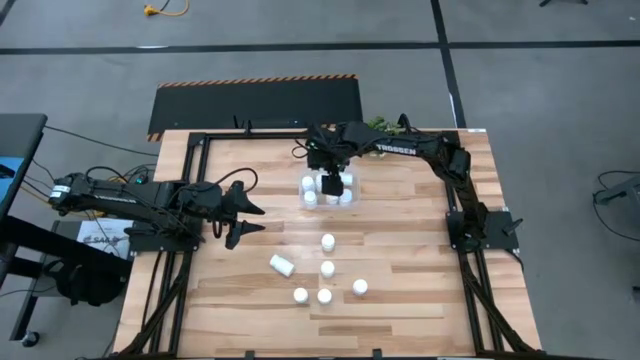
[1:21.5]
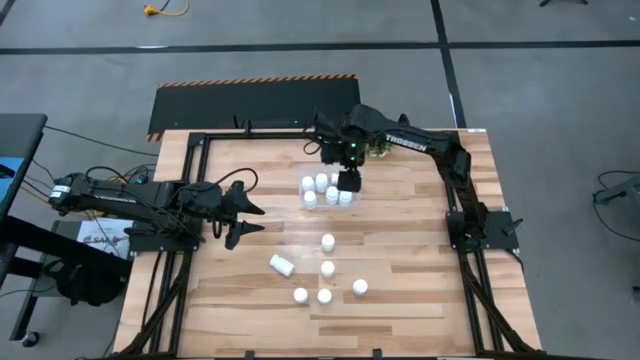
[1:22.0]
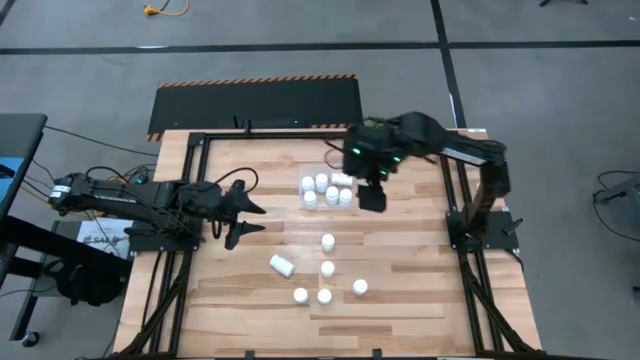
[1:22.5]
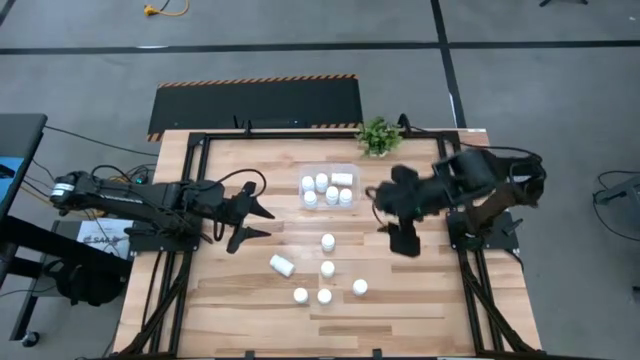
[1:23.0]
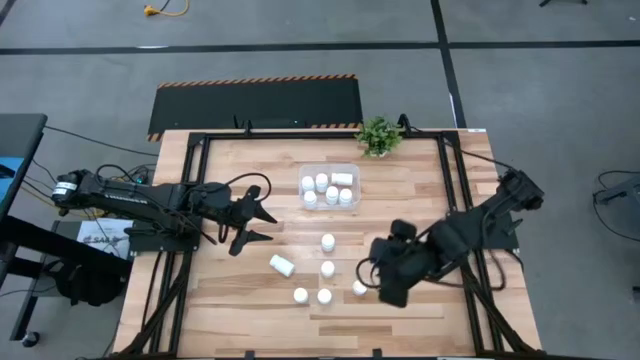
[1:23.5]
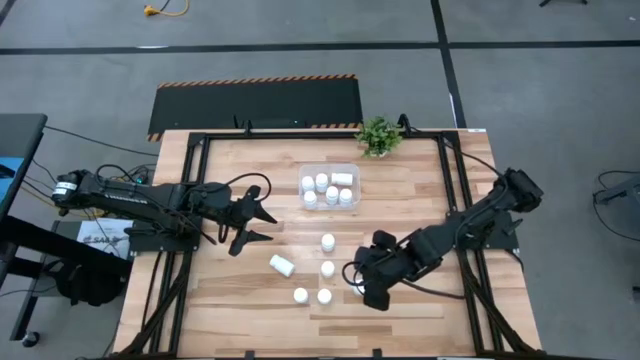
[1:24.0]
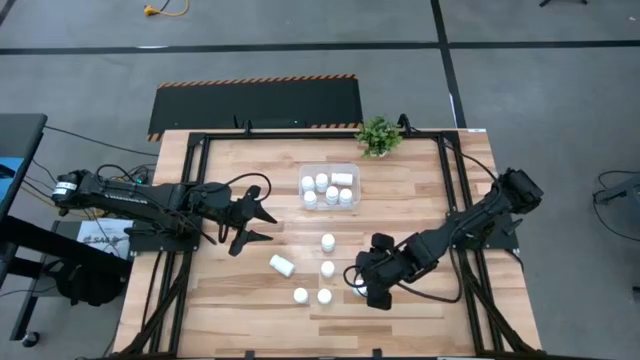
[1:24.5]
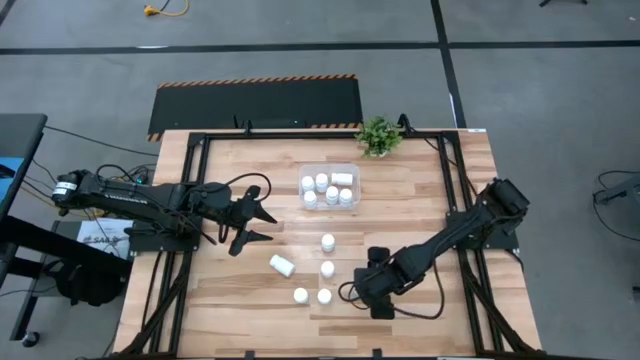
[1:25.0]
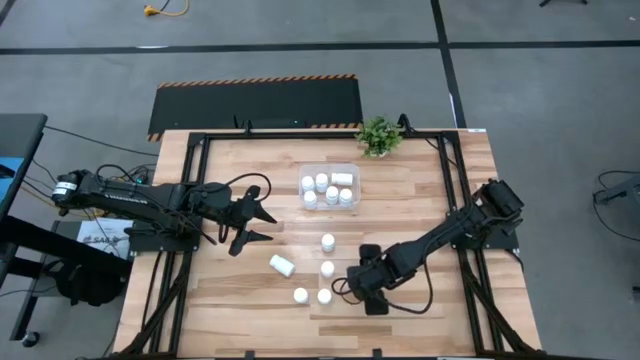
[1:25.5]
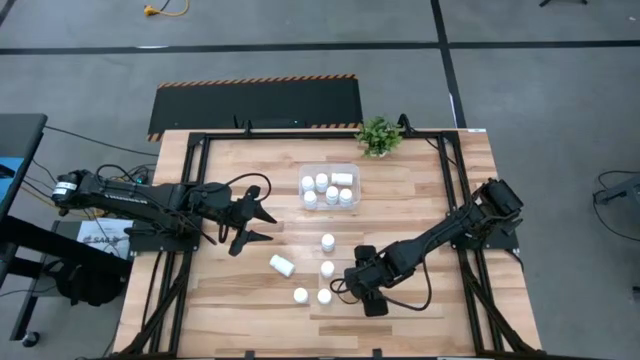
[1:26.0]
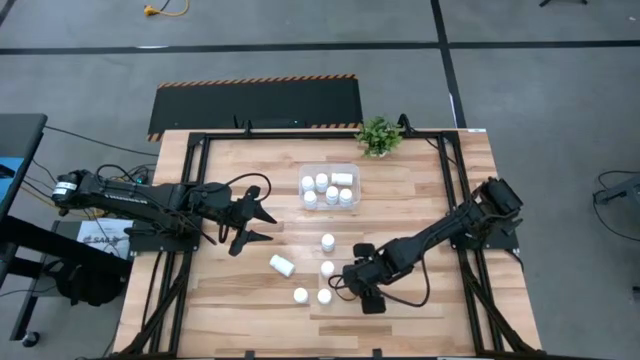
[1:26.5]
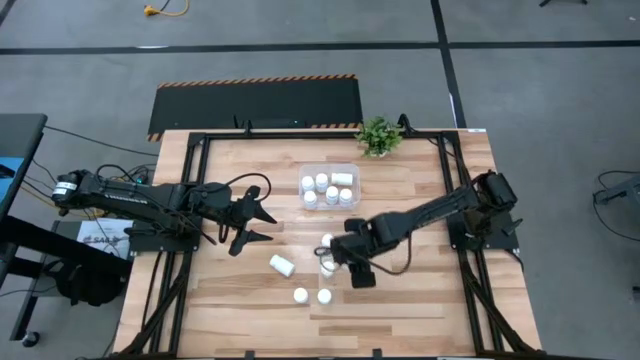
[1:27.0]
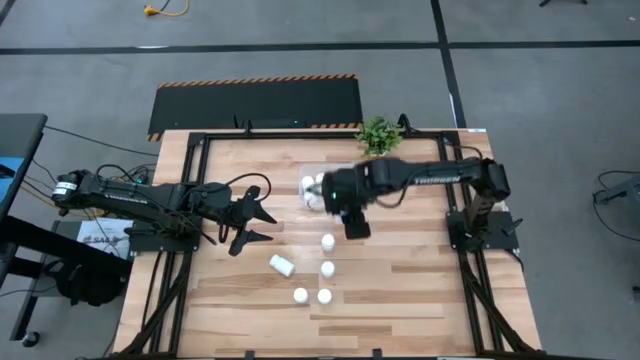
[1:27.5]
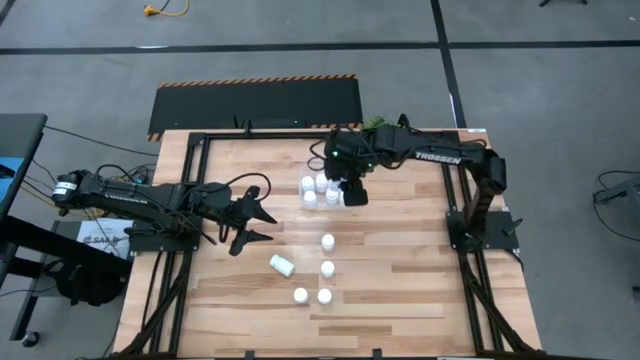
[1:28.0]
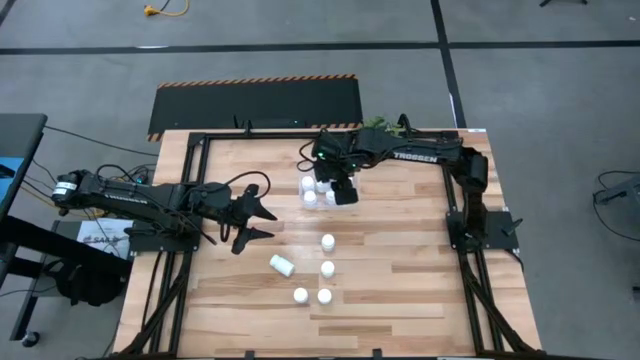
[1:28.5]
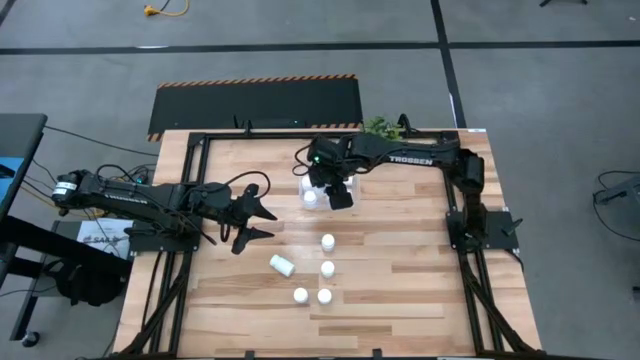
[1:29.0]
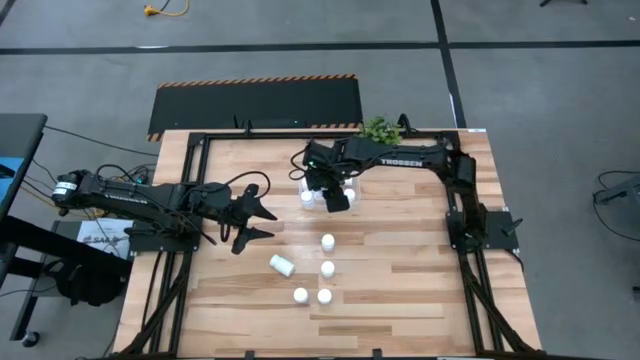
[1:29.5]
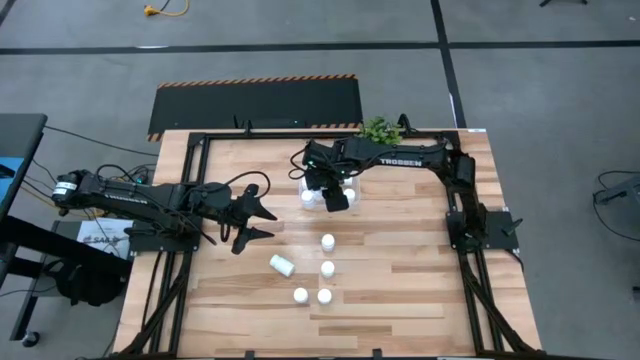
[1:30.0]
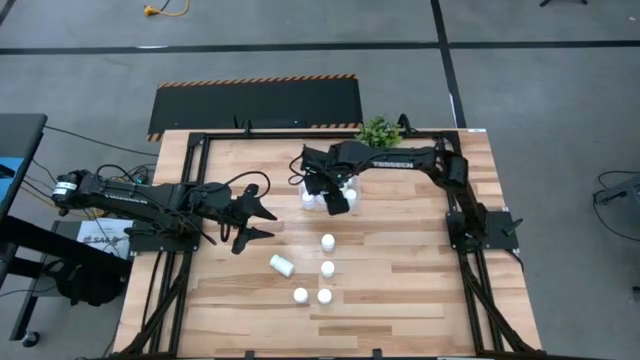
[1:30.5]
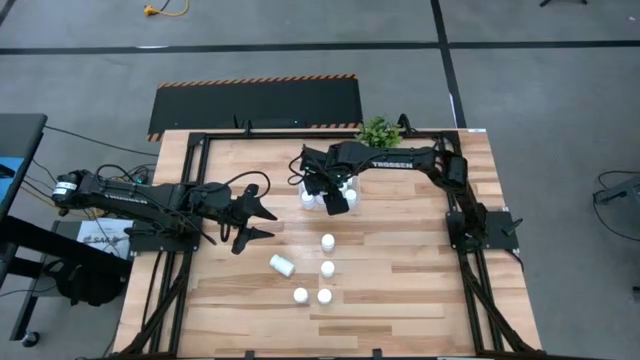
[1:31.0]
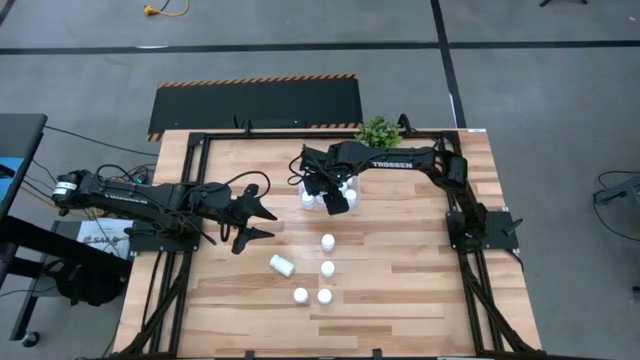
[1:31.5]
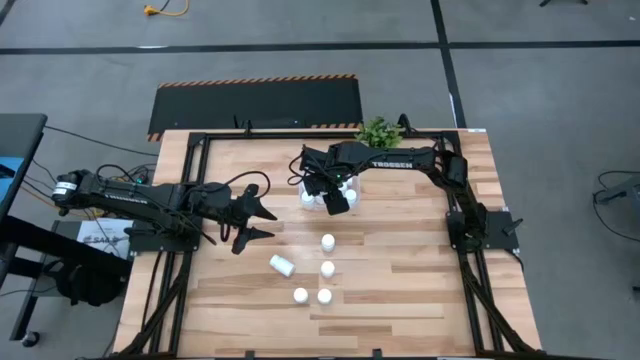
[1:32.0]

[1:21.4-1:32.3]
Task: Pick and place pill bottles into a basket
Put the white medicine bottle into the transparent bin

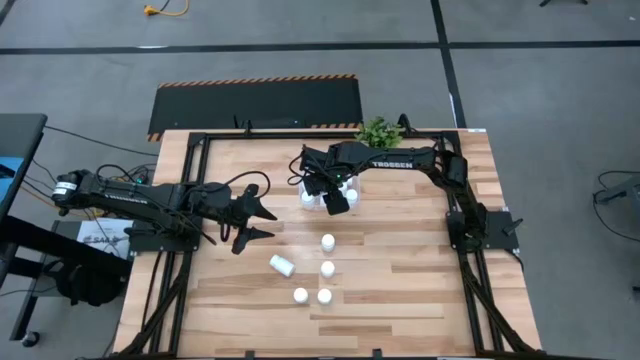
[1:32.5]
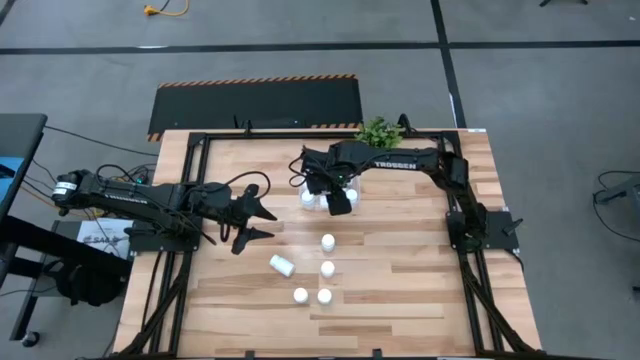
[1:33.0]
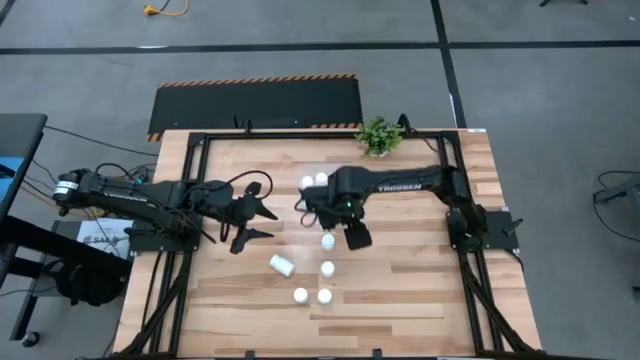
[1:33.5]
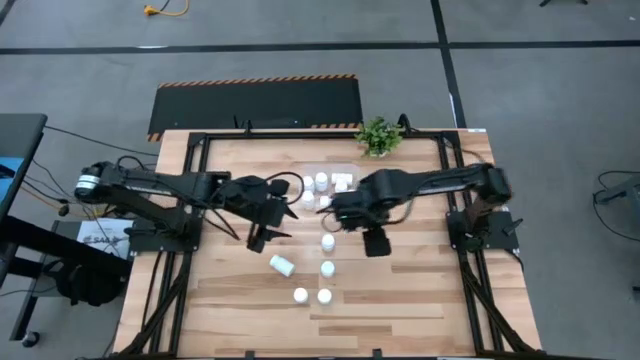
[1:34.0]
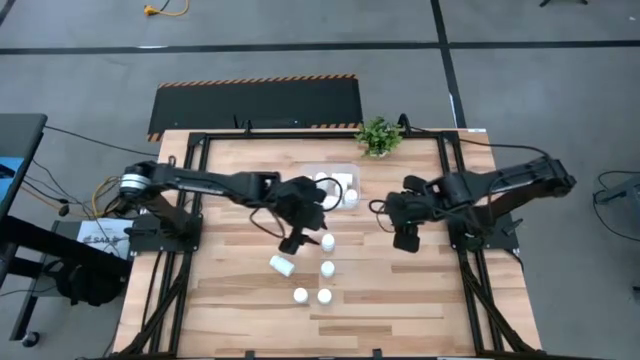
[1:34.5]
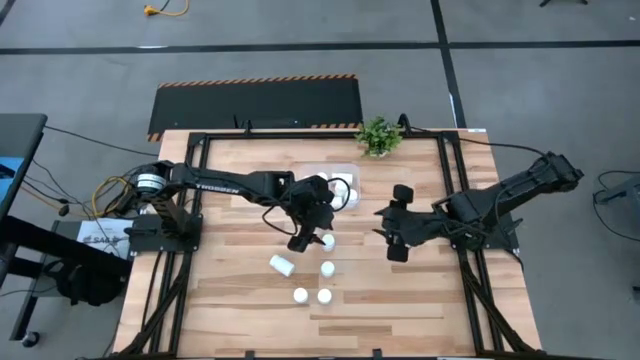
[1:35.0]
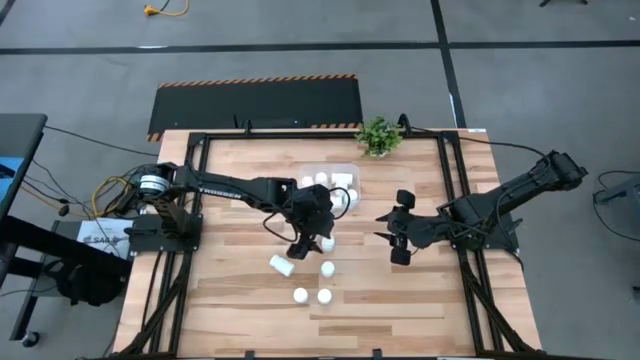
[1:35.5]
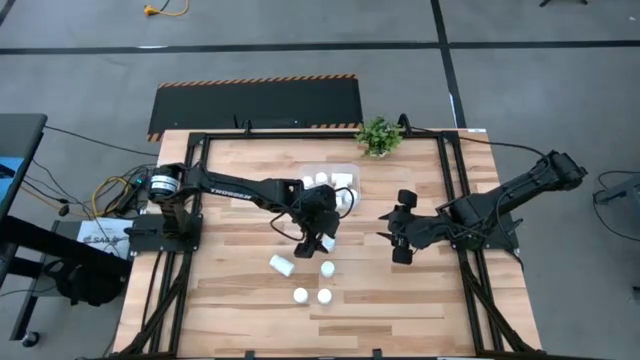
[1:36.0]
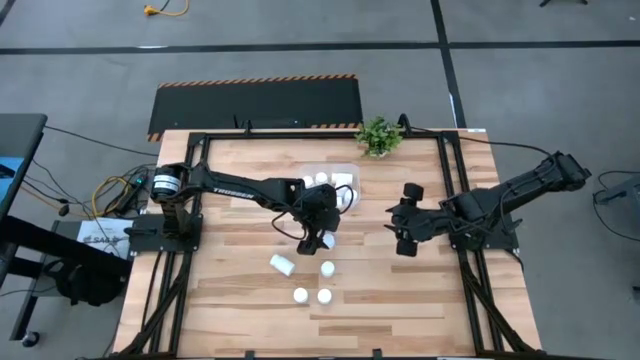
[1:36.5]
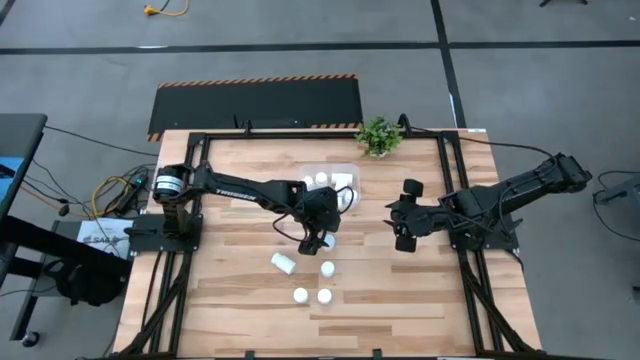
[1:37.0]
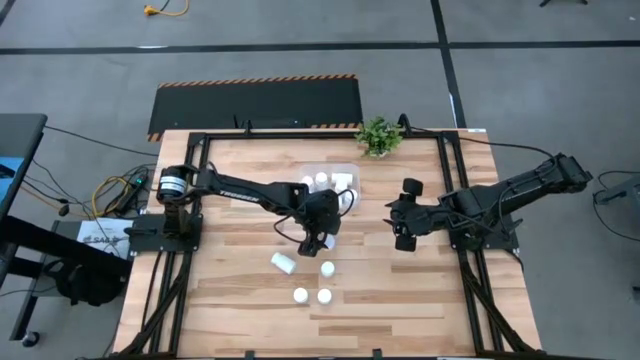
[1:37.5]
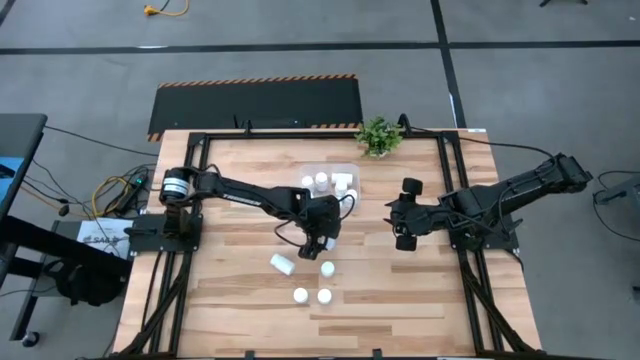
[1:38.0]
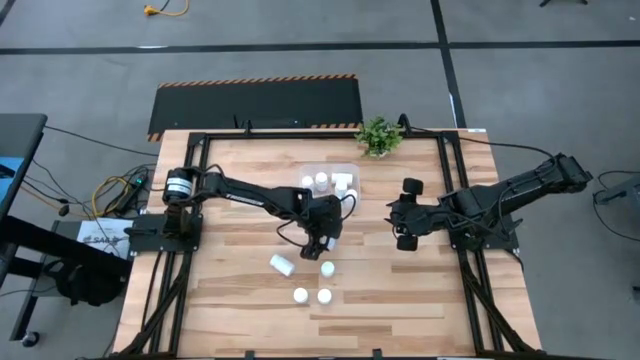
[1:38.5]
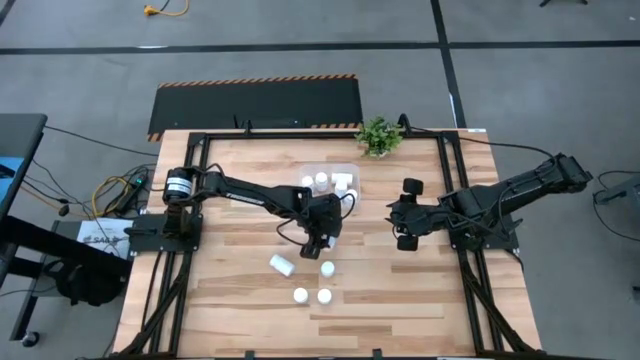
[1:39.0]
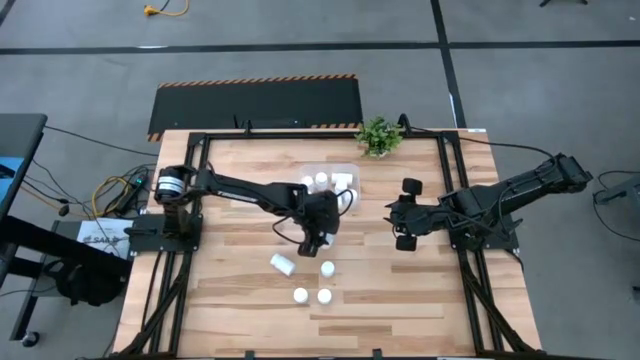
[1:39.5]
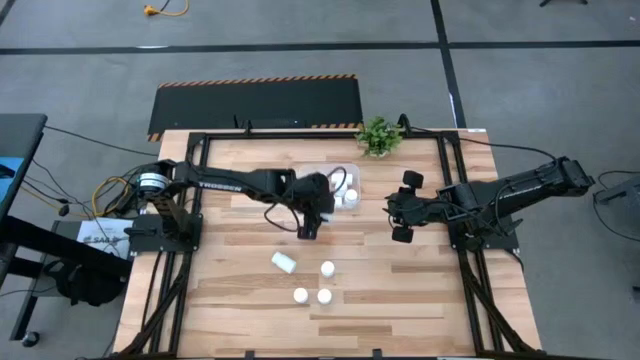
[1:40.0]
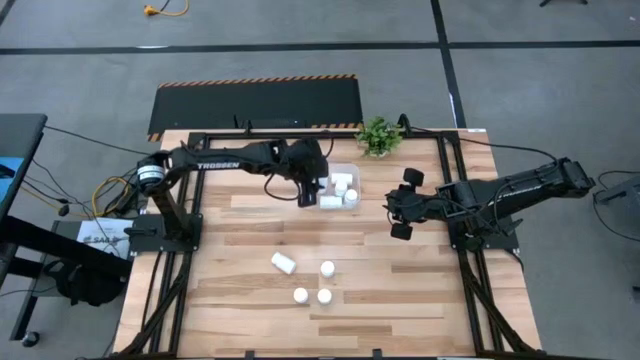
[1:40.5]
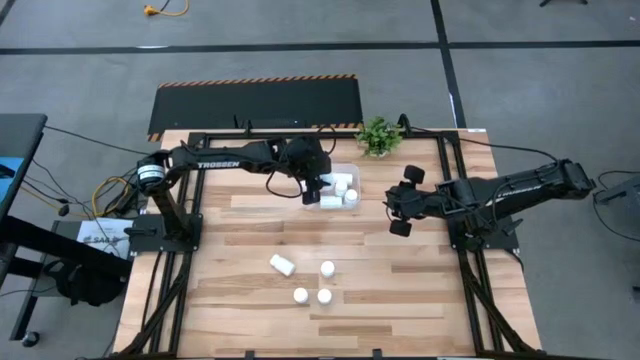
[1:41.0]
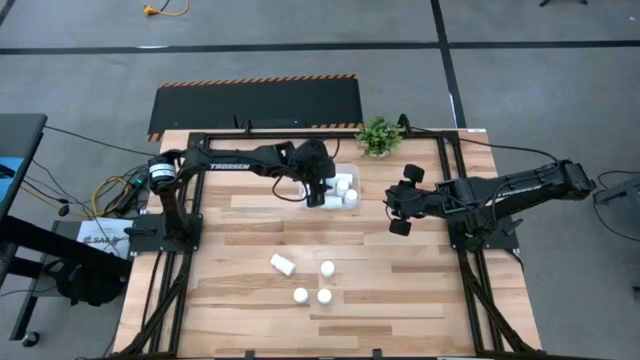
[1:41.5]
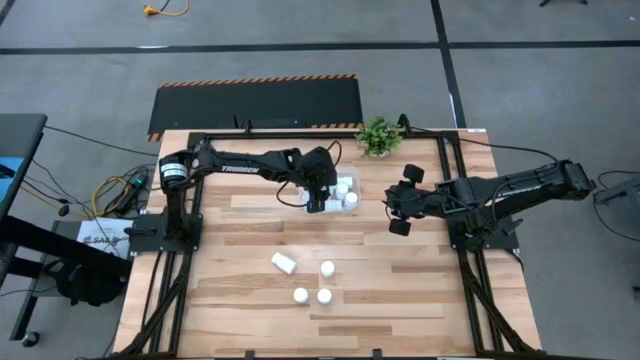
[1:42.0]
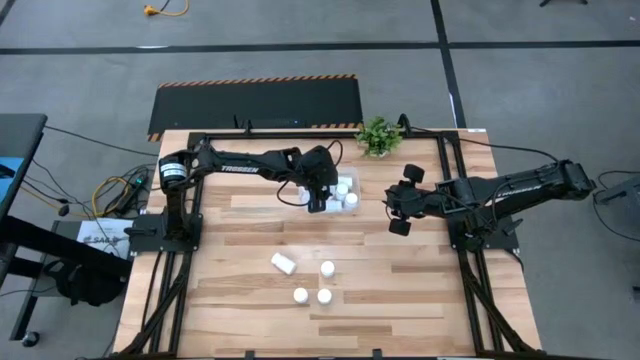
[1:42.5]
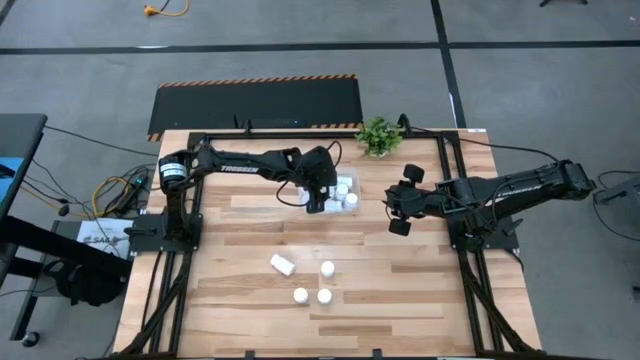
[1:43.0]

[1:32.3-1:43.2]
Put the white medicine bottle into the transparent bin
